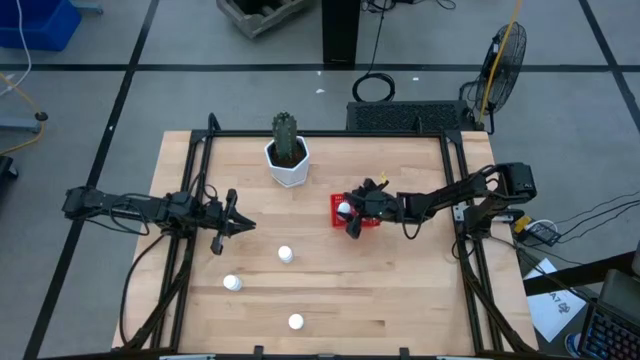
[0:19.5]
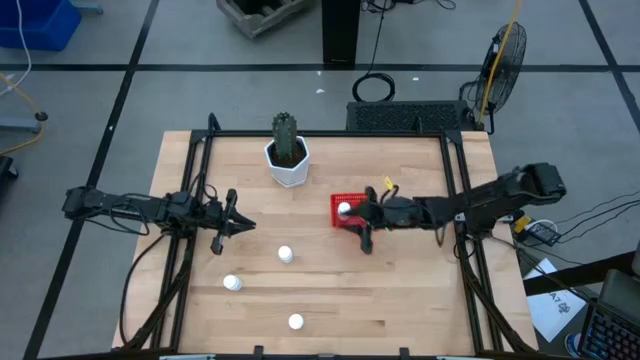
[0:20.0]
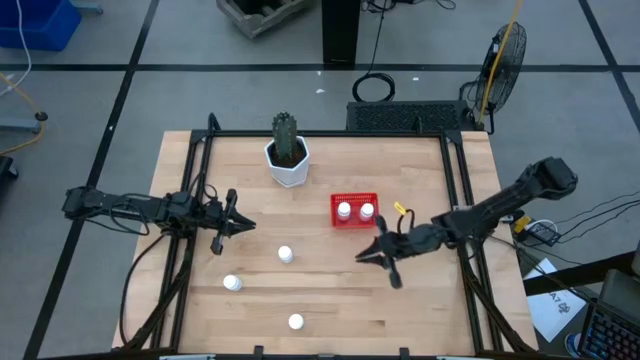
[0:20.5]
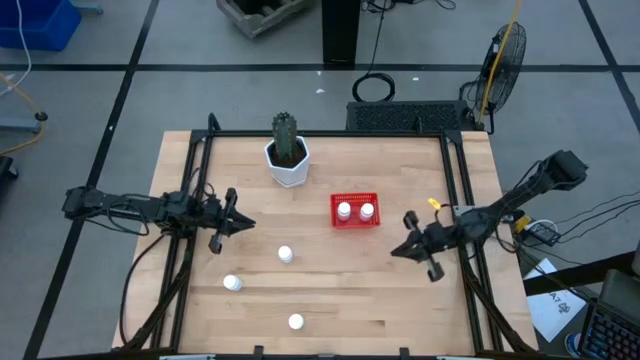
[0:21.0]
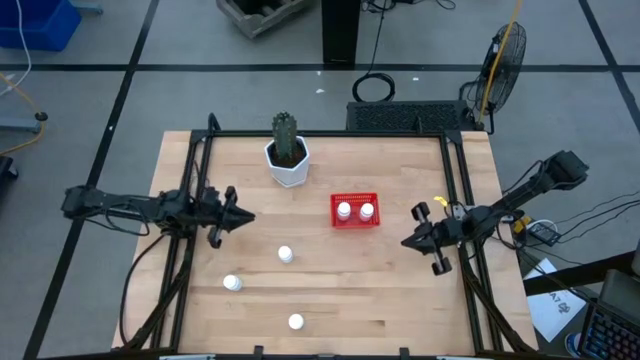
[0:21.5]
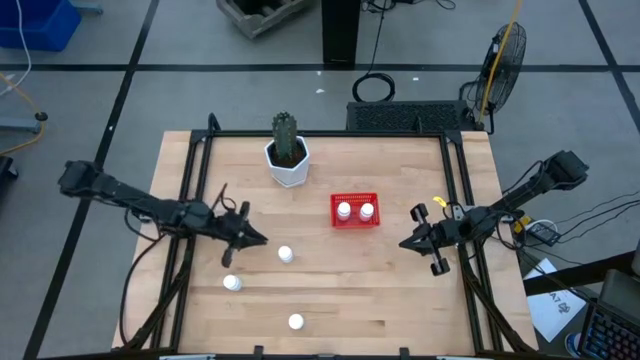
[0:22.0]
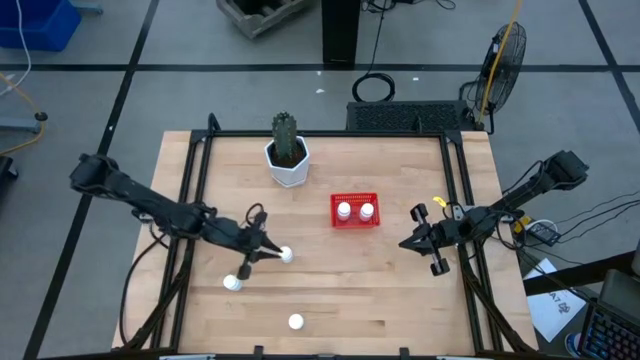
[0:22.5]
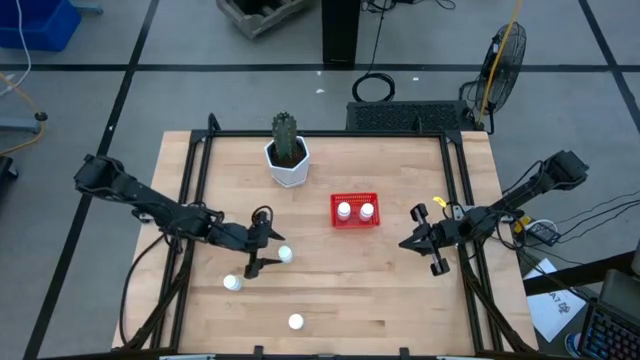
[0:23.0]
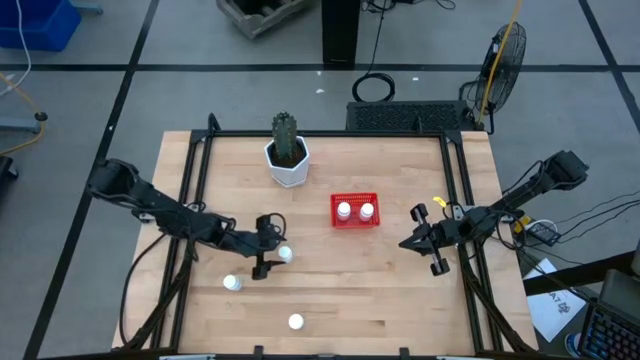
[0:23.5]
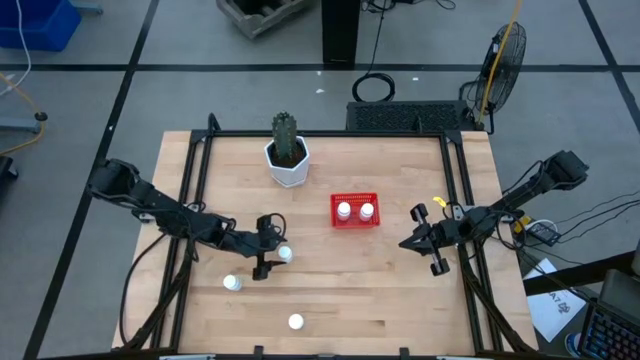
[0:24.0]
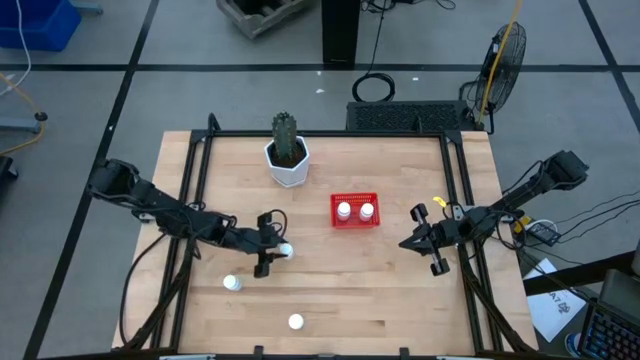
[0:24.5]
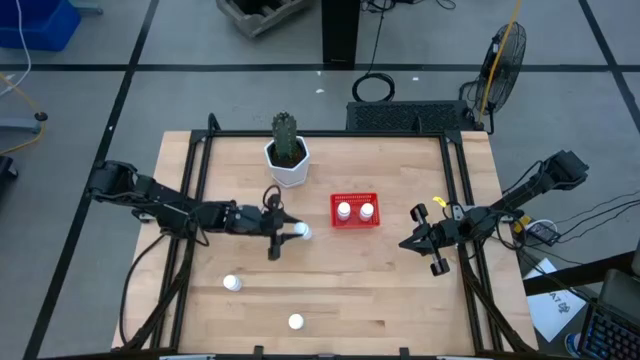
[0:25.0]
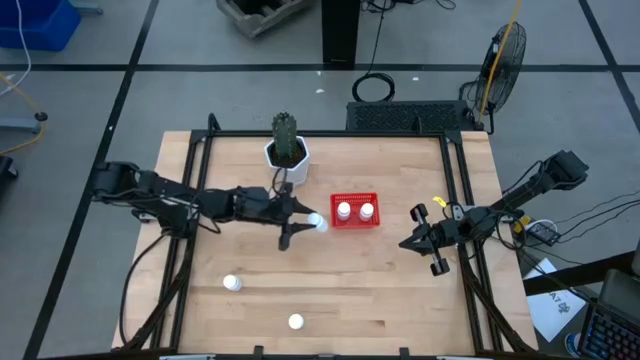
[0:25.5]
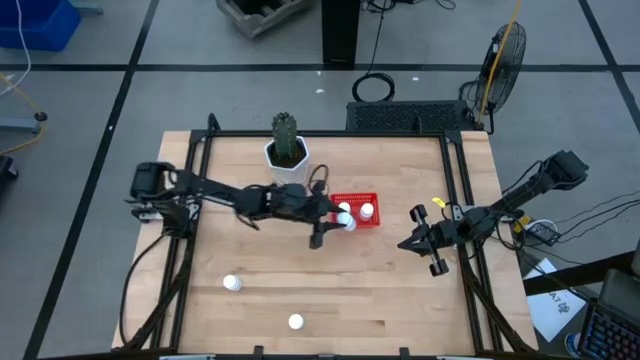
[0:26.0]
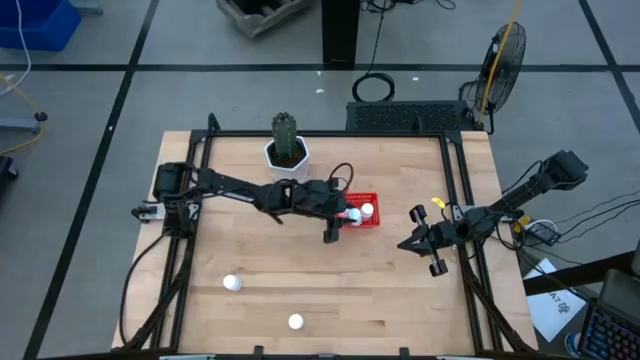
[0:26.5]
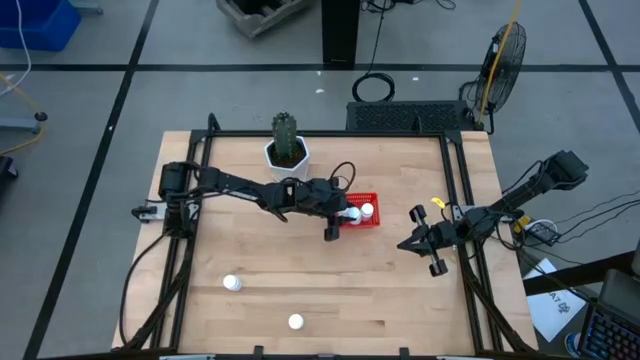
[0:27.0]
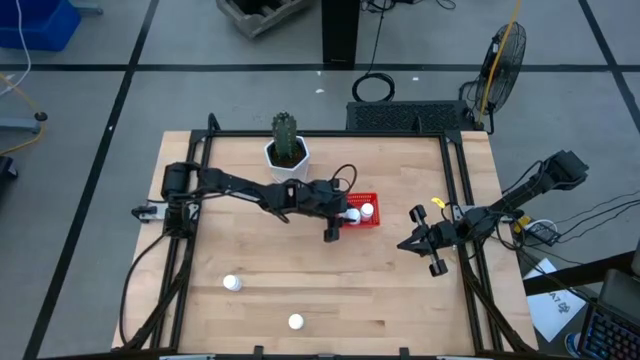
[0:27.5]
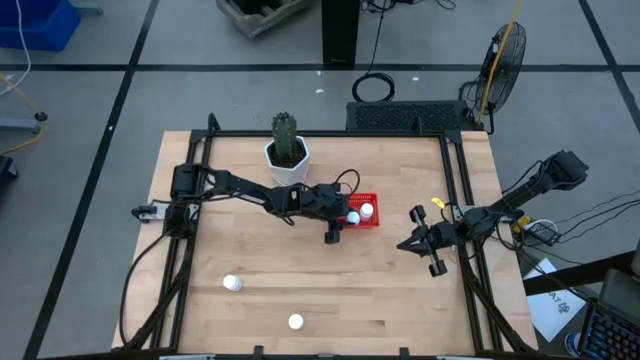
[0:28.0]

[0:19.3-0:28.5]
Task: Pick and place pill bottles into a basket
Put the white pill bottle into the red bin

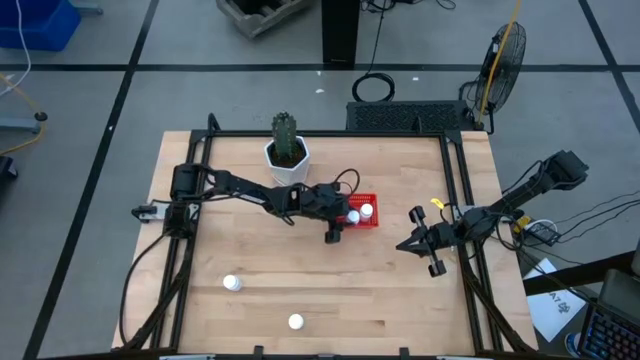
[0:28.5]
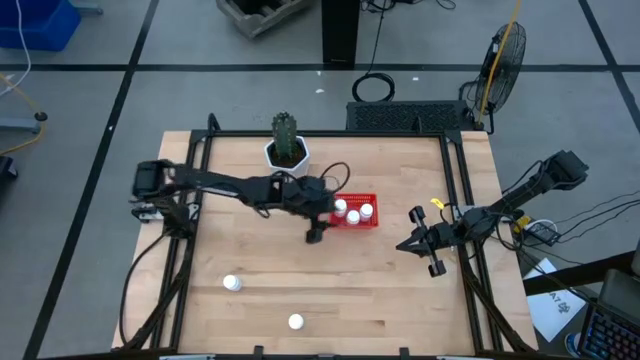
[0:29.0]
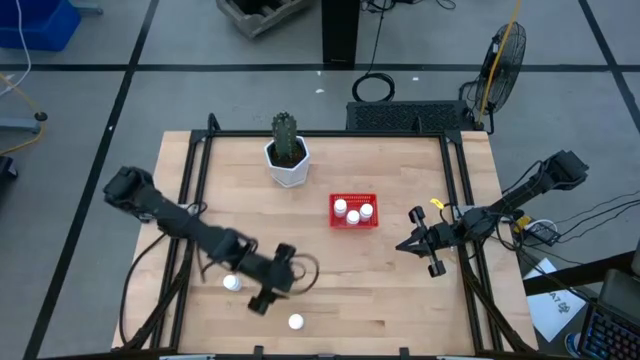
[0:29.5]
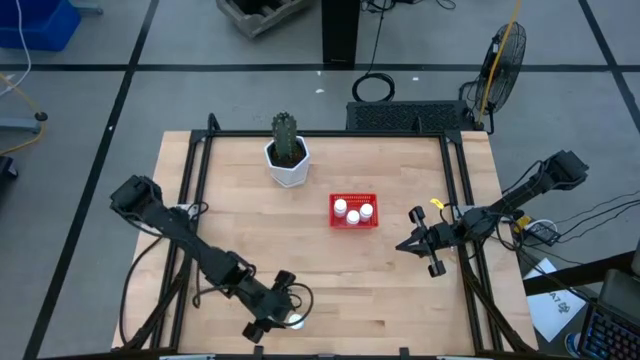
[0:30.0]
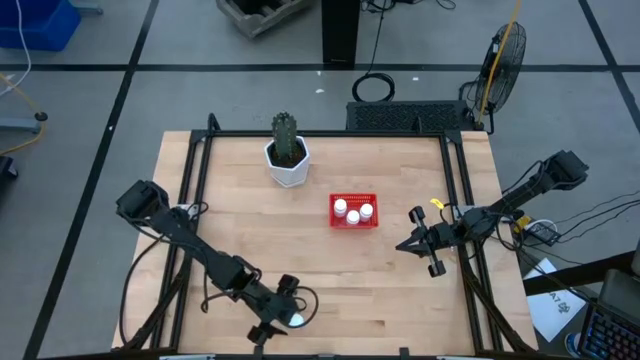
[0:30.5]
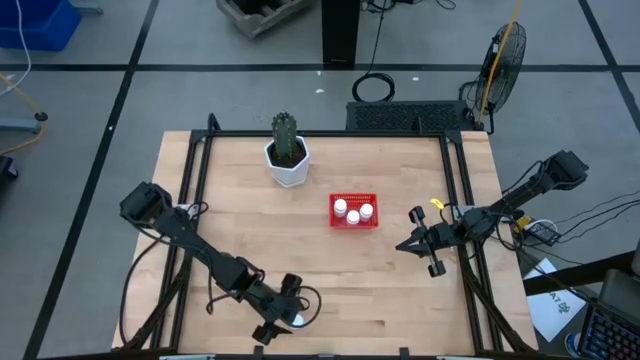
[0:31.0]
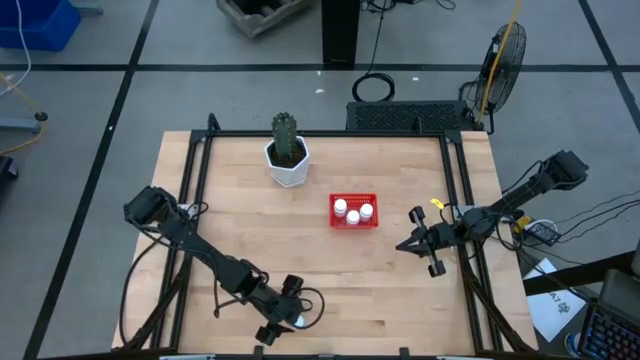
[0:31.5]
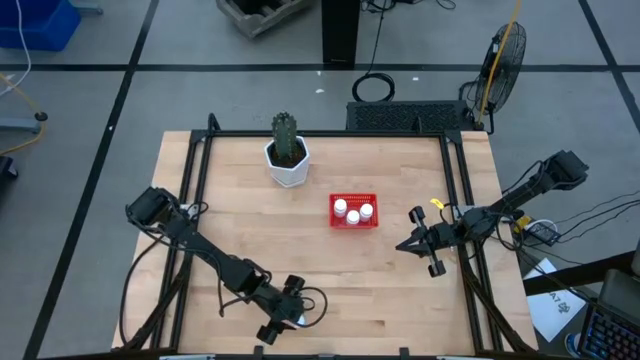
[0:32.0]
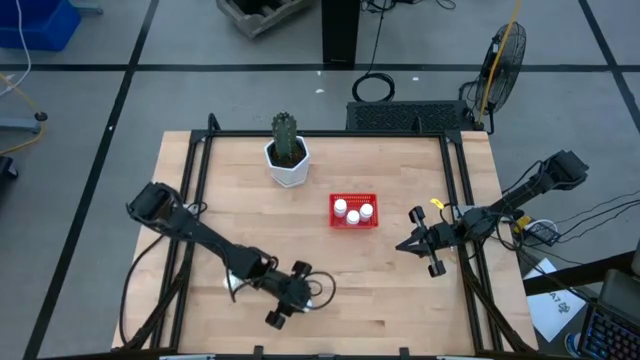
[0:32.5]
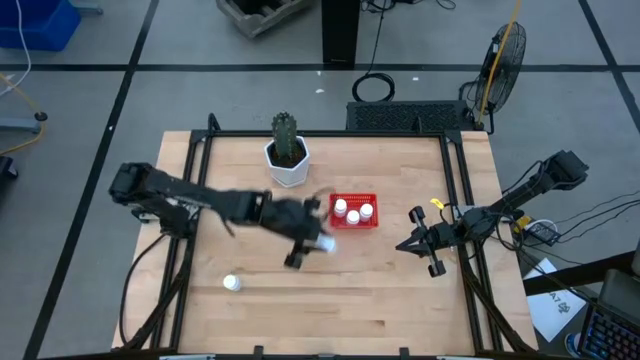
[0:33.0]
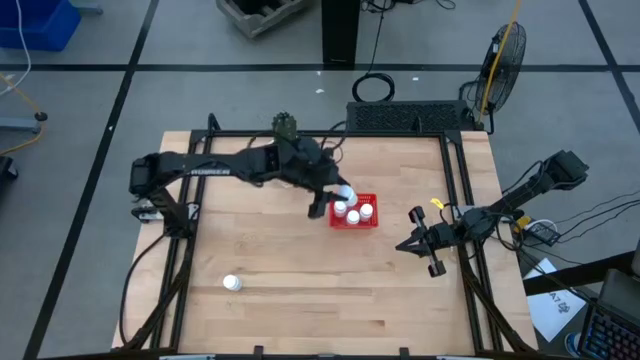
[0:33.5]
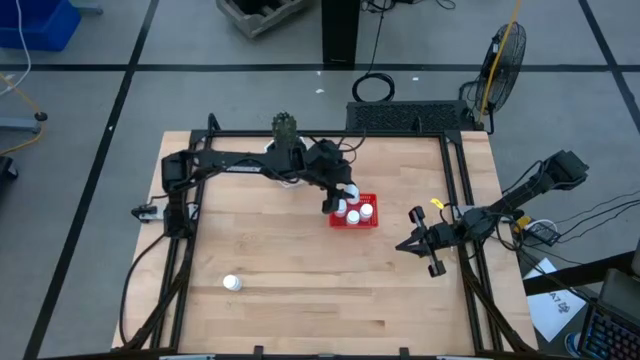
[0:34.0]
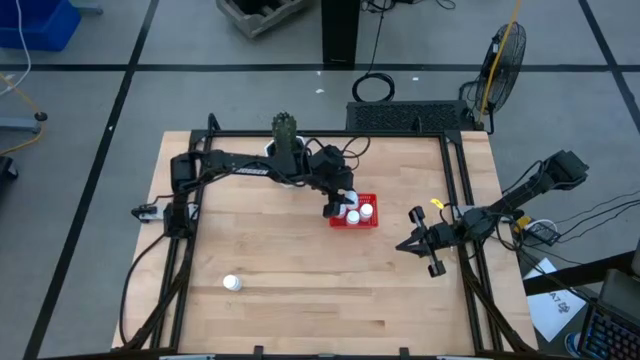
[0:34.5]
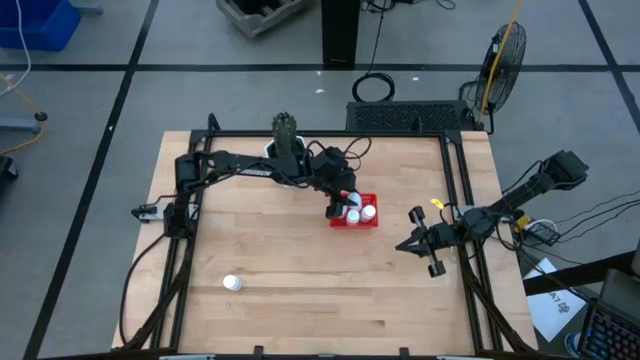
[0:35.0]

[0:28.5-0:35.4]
Put the white pill bottle into the red bin

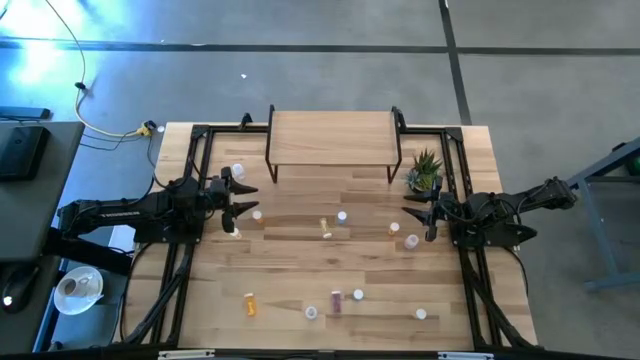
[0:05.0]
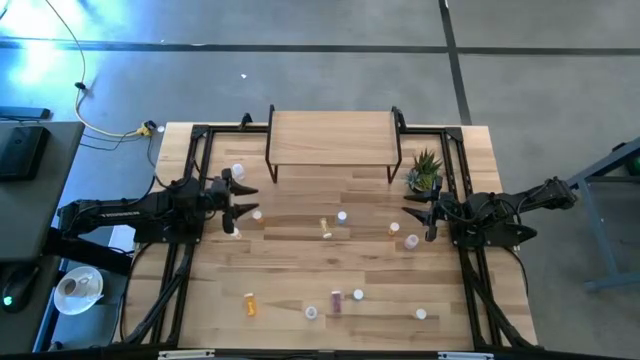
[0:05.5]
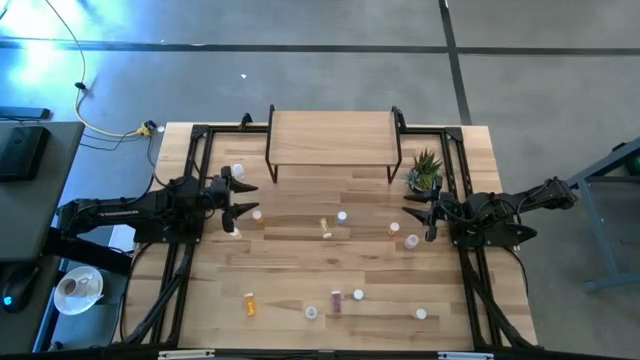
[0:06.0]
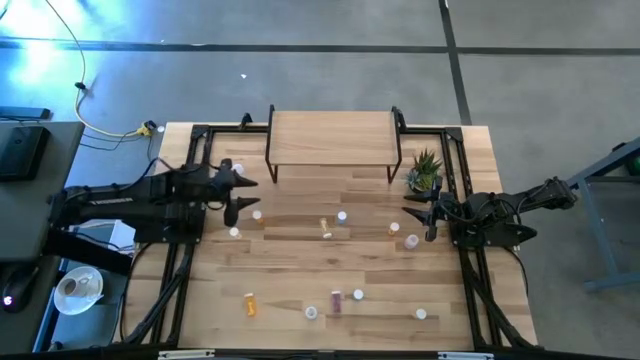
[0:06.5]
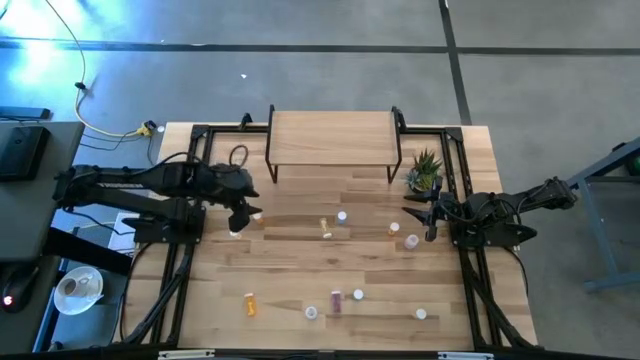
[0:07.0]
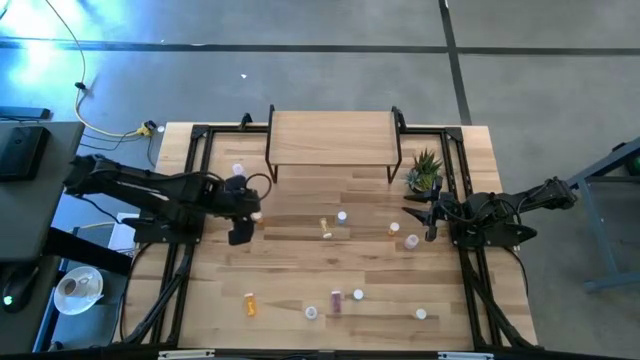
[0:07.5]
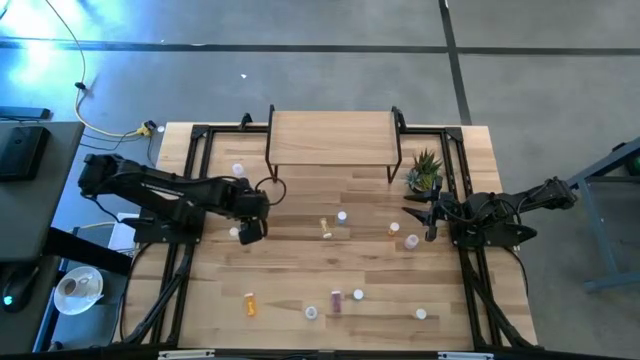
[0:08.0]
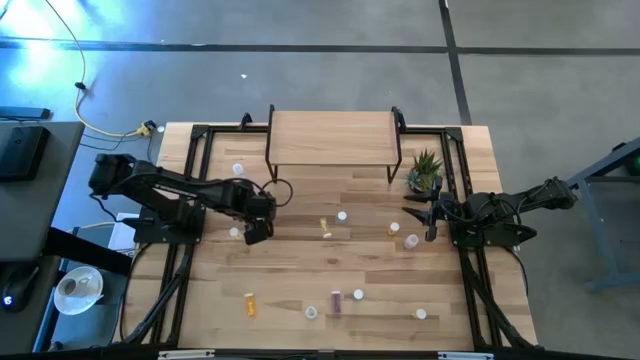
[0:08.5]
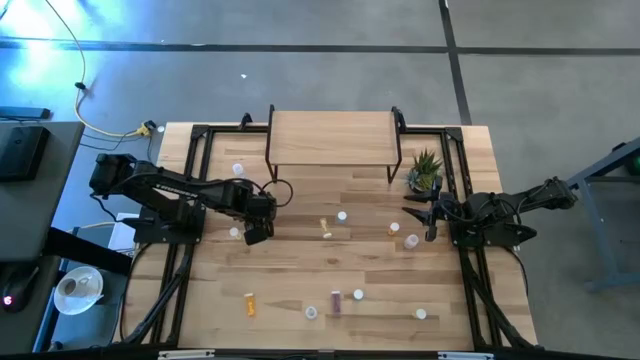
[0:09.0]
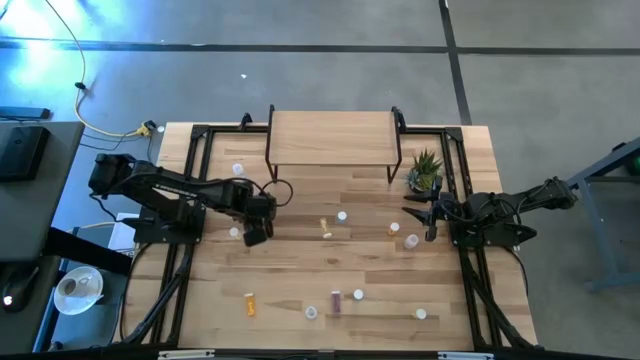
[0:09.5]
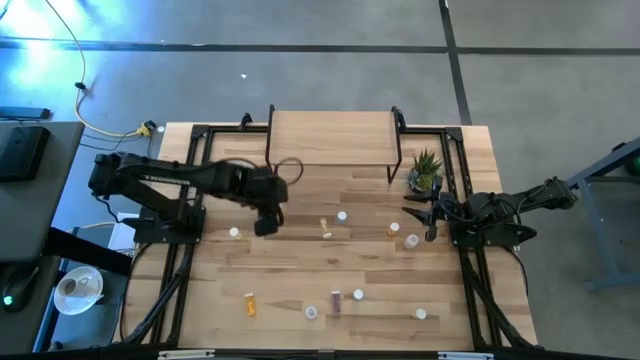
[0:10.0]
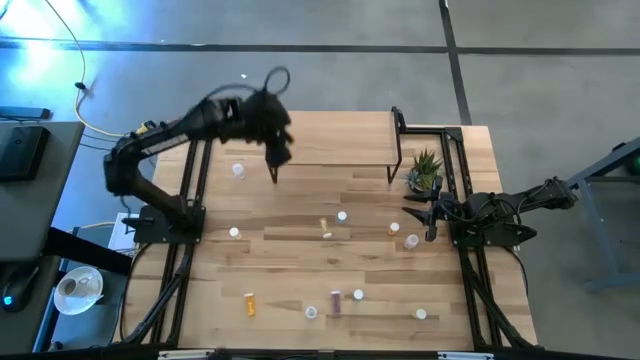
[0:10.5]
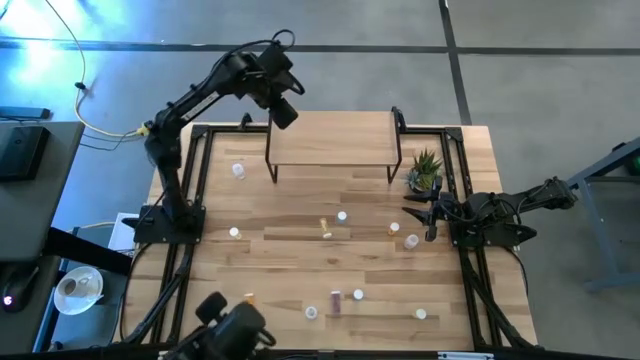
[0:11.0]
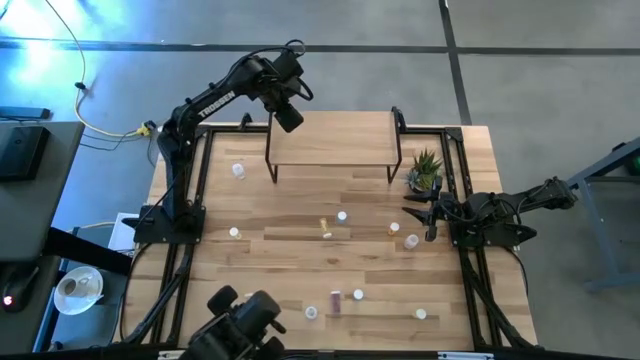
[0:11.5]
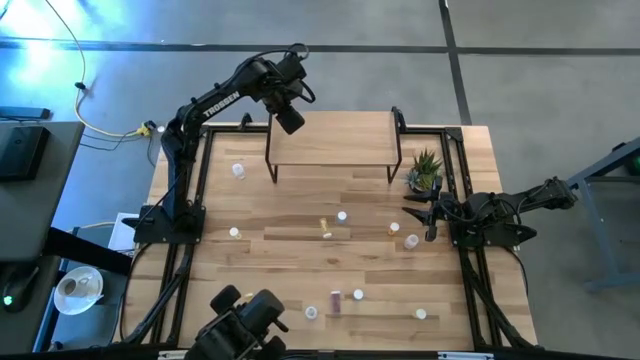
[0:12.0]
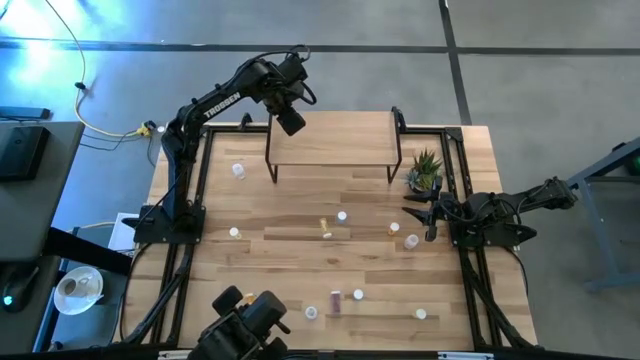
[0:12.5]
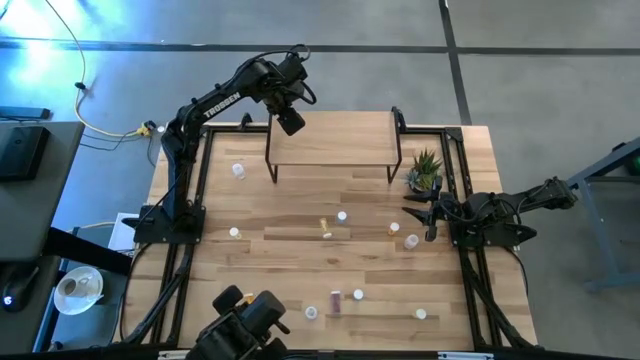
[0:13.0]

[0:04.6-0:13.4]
Task: Pick and place medicine bottles onto shelf by color
Put the top left orange pill bottle on the shelf
